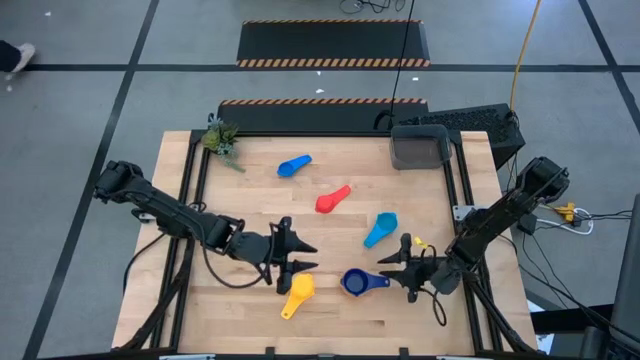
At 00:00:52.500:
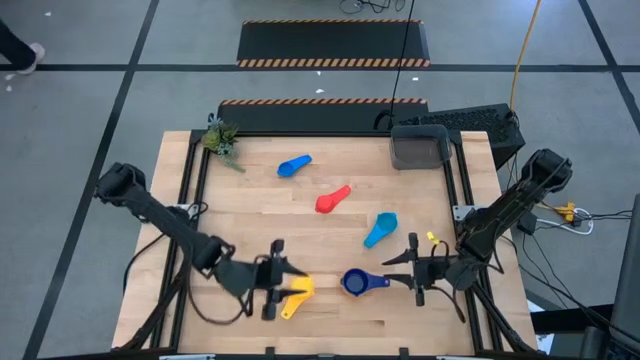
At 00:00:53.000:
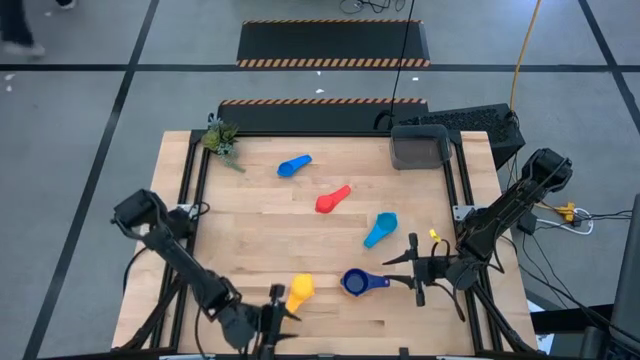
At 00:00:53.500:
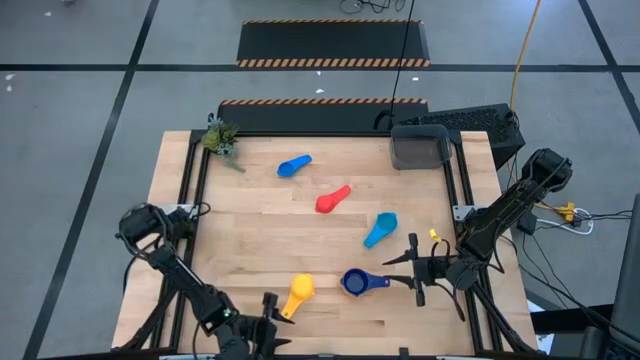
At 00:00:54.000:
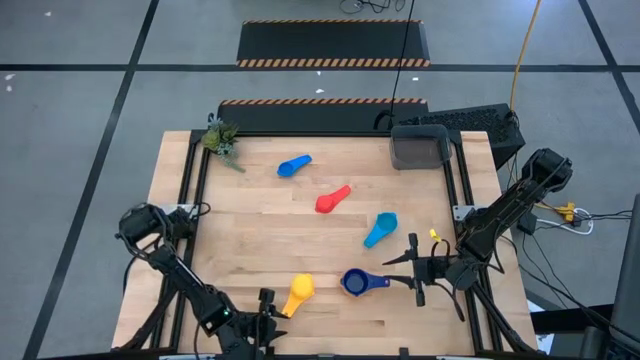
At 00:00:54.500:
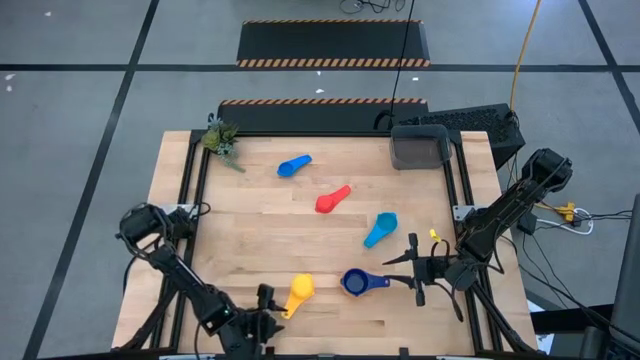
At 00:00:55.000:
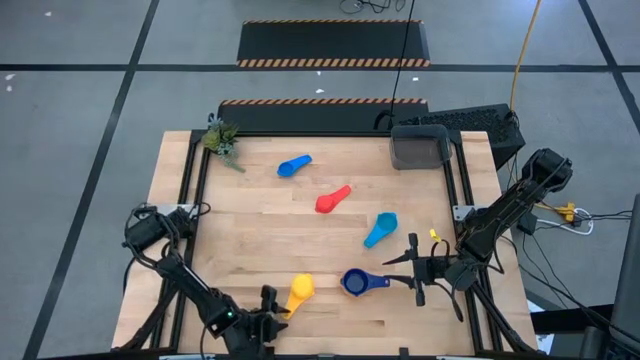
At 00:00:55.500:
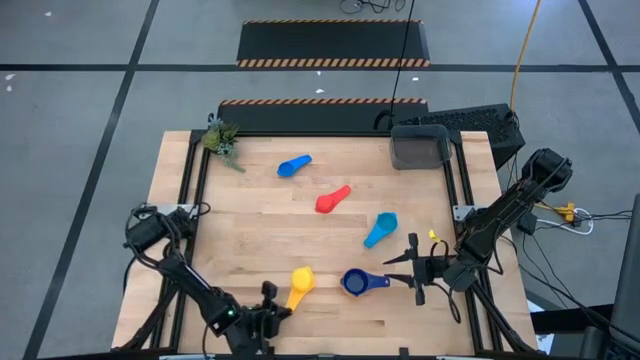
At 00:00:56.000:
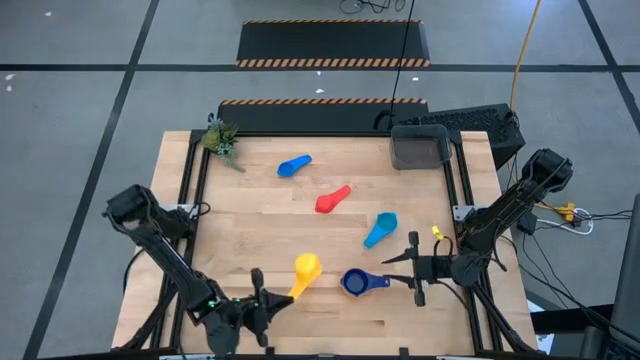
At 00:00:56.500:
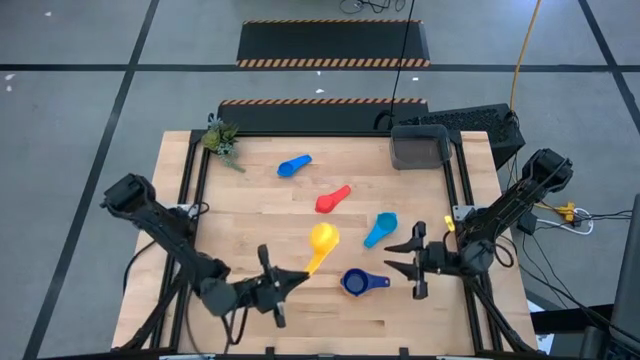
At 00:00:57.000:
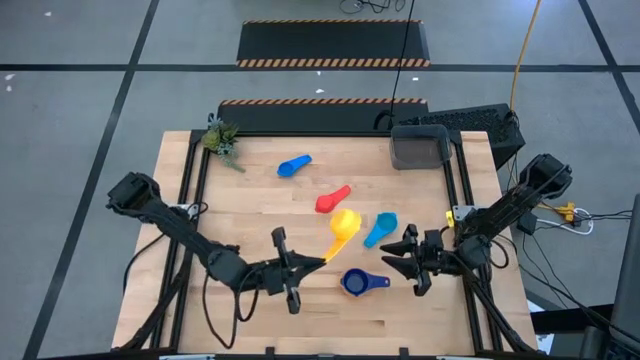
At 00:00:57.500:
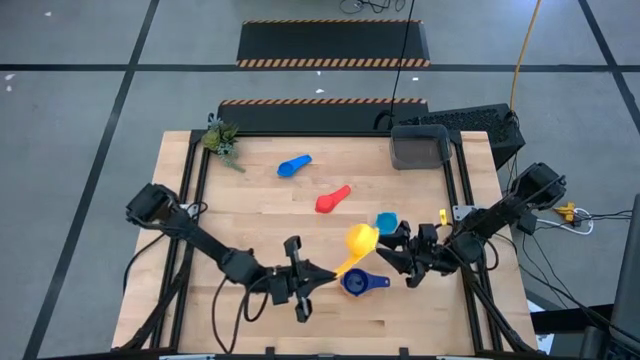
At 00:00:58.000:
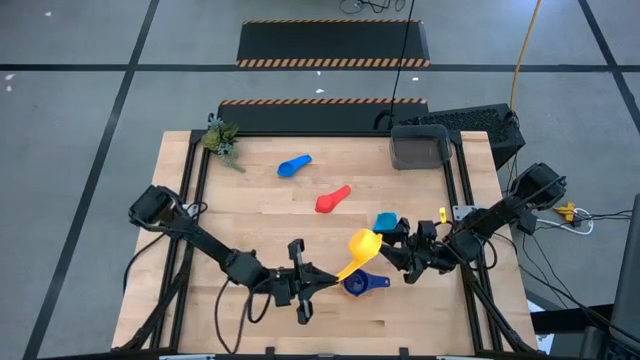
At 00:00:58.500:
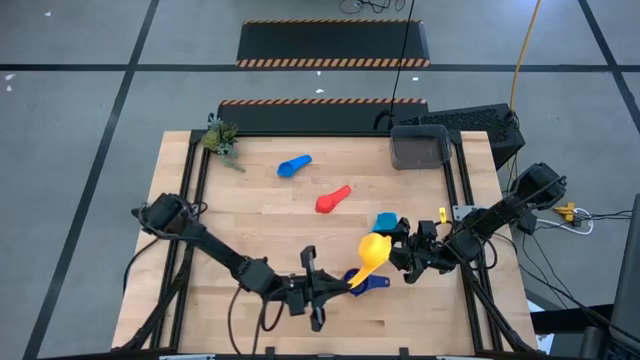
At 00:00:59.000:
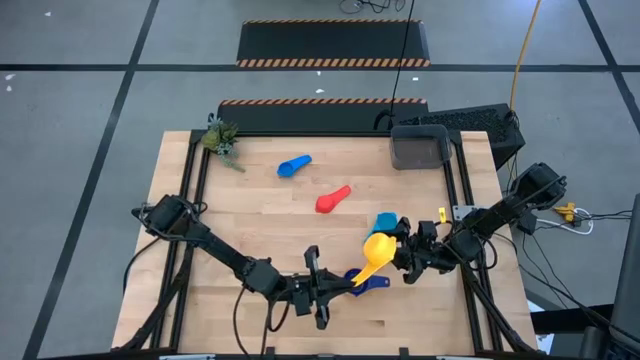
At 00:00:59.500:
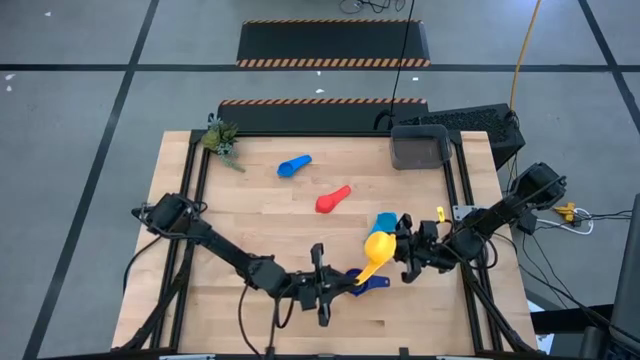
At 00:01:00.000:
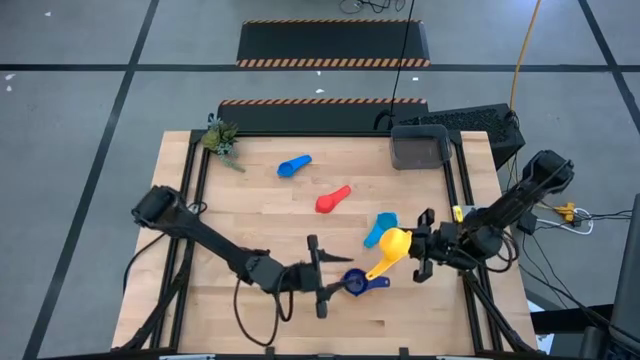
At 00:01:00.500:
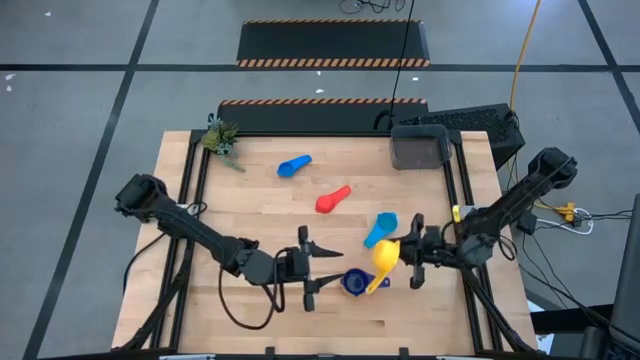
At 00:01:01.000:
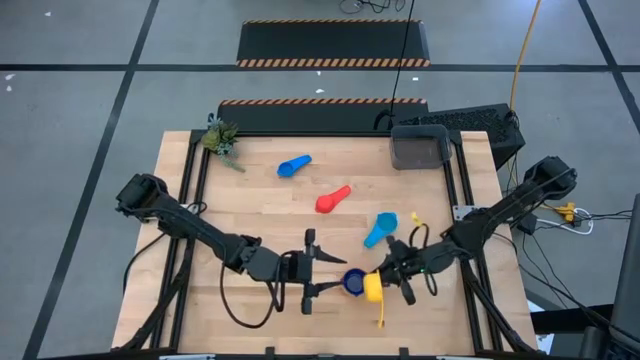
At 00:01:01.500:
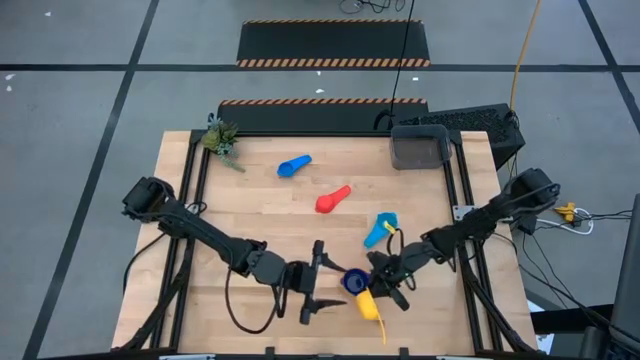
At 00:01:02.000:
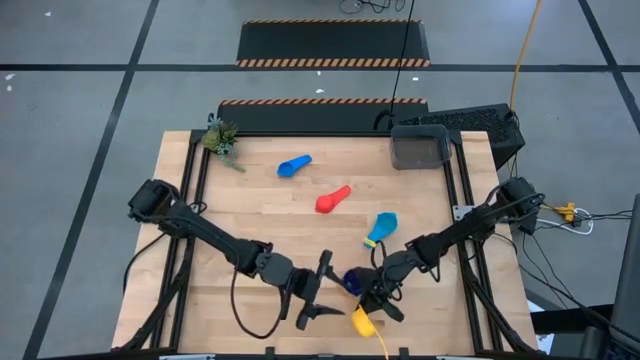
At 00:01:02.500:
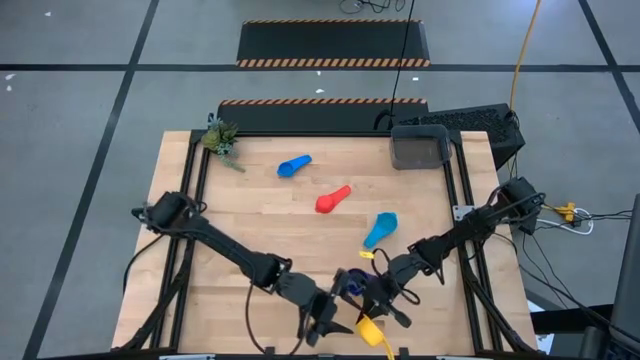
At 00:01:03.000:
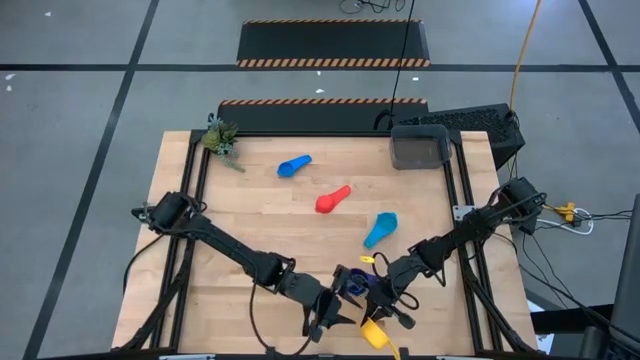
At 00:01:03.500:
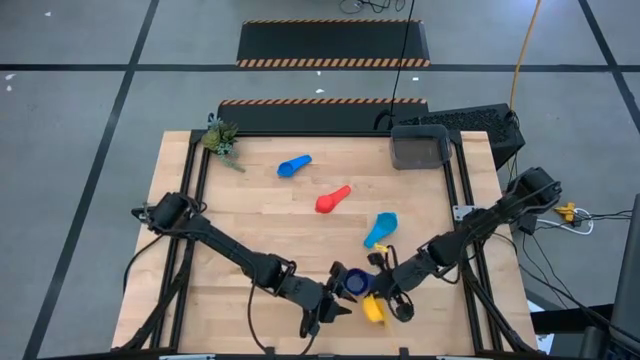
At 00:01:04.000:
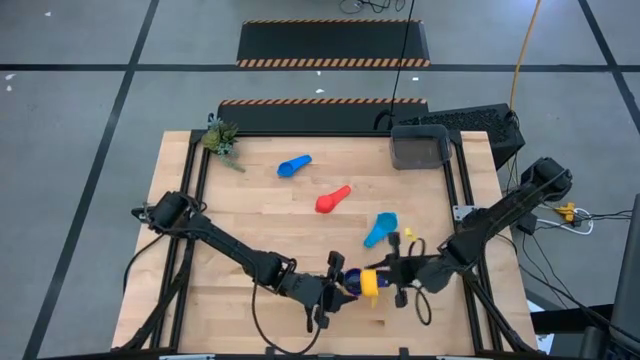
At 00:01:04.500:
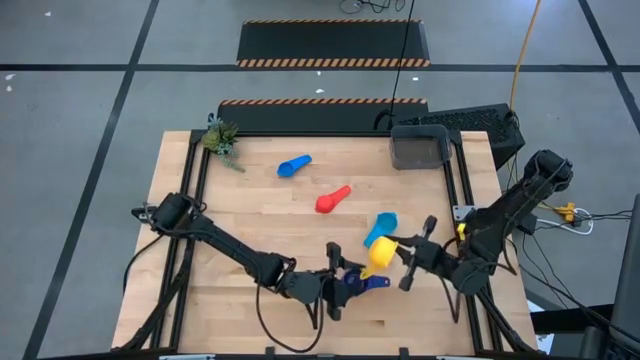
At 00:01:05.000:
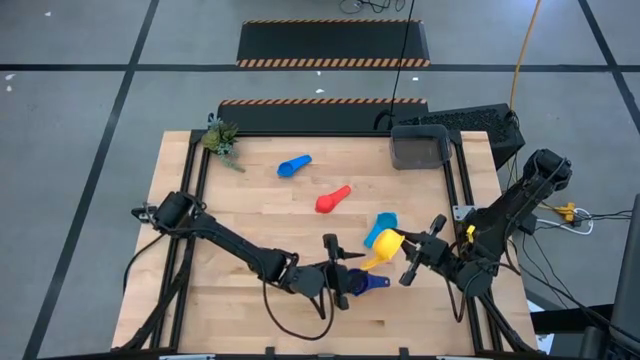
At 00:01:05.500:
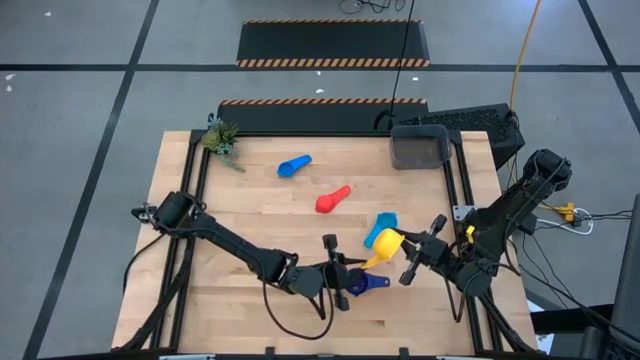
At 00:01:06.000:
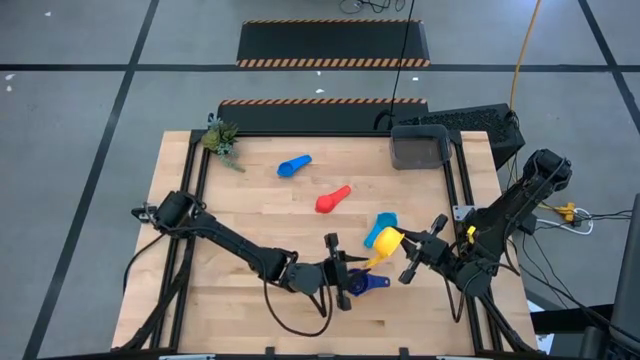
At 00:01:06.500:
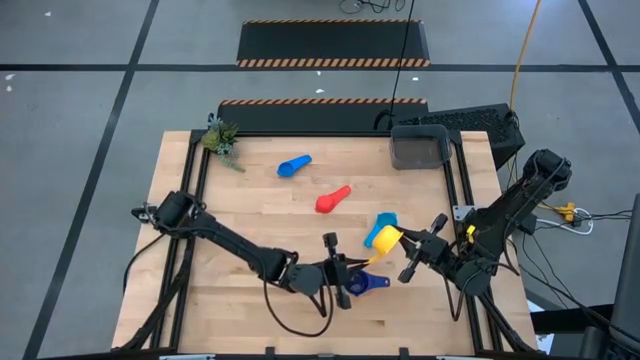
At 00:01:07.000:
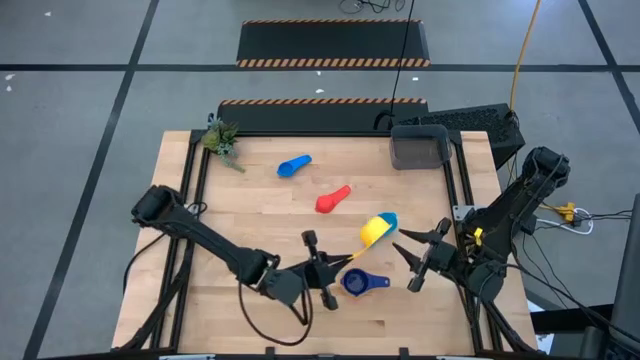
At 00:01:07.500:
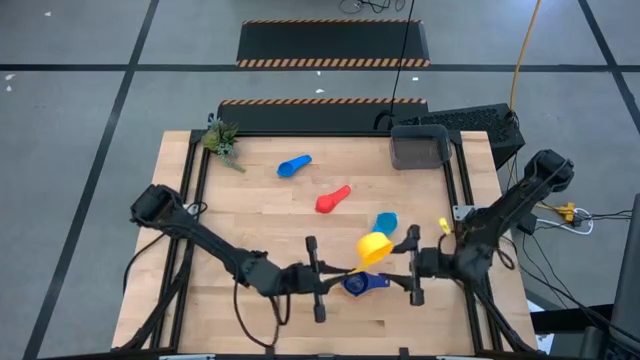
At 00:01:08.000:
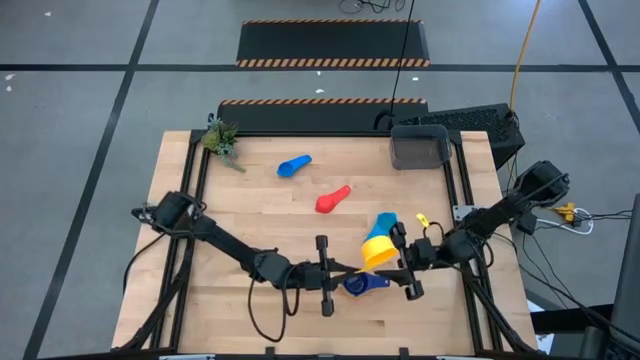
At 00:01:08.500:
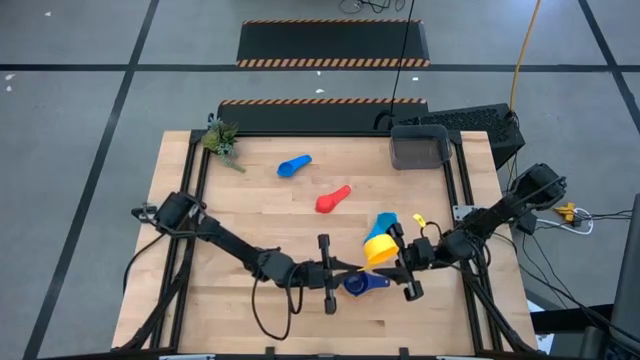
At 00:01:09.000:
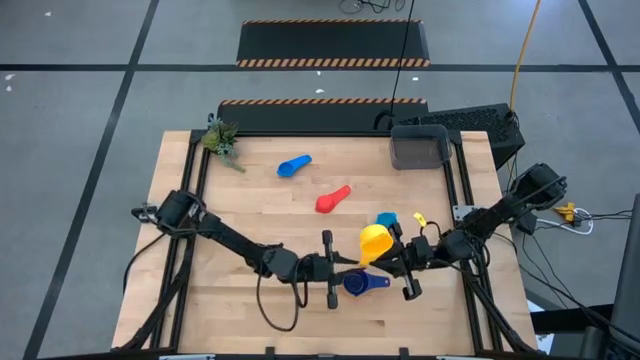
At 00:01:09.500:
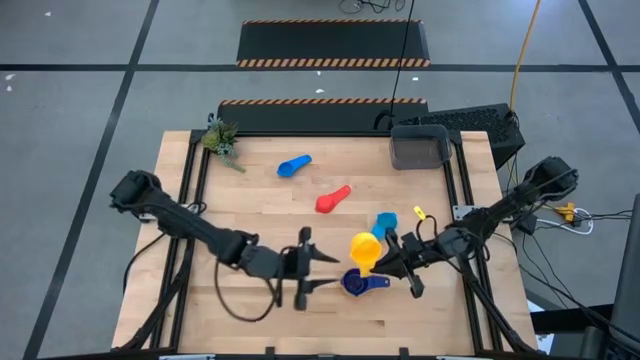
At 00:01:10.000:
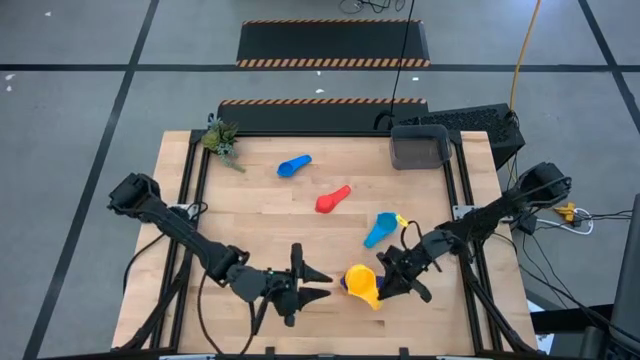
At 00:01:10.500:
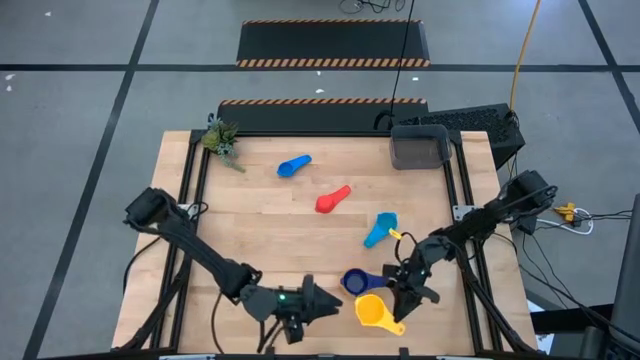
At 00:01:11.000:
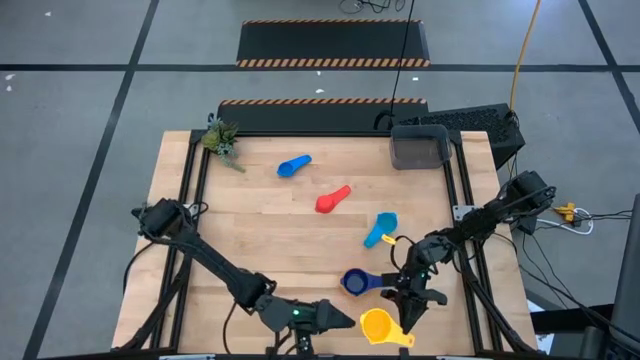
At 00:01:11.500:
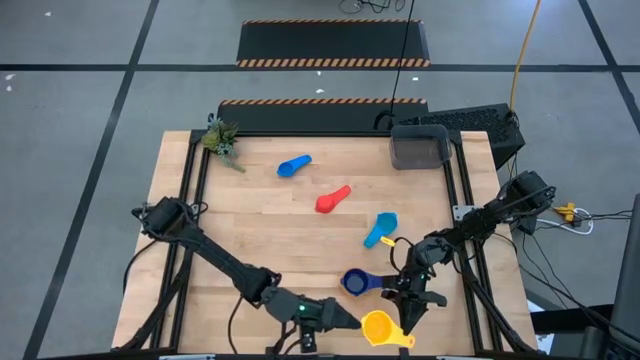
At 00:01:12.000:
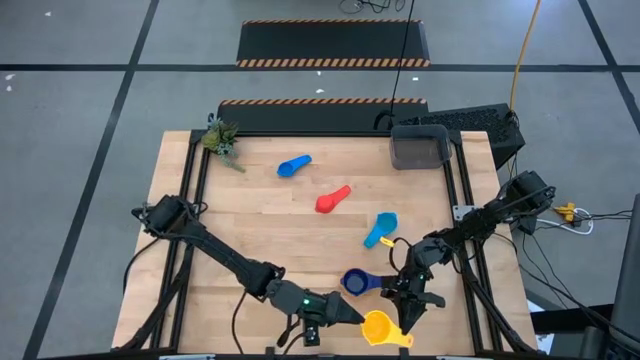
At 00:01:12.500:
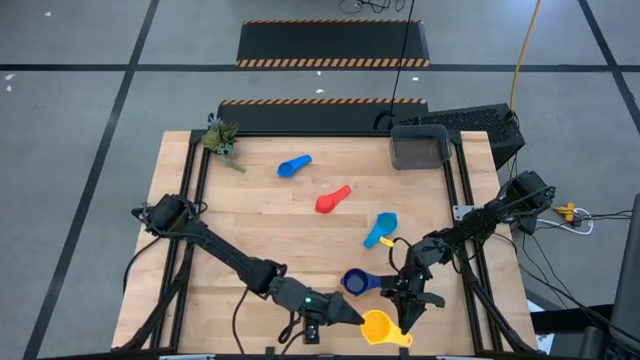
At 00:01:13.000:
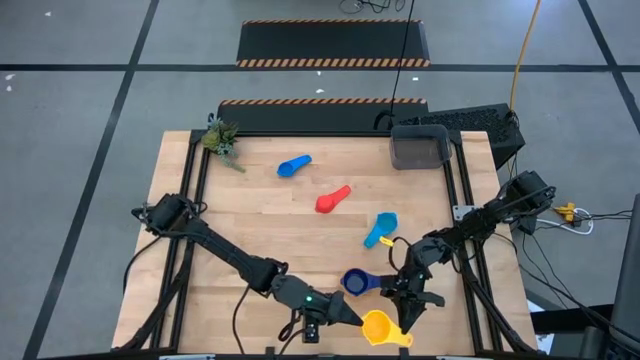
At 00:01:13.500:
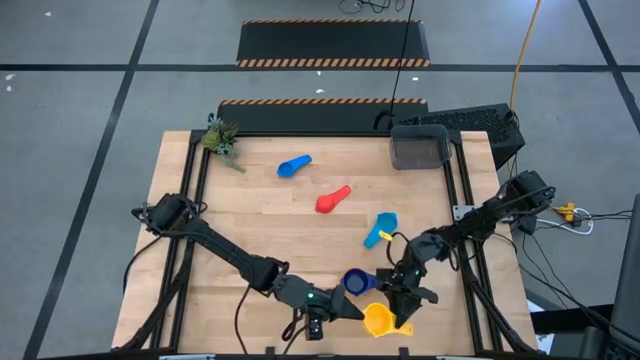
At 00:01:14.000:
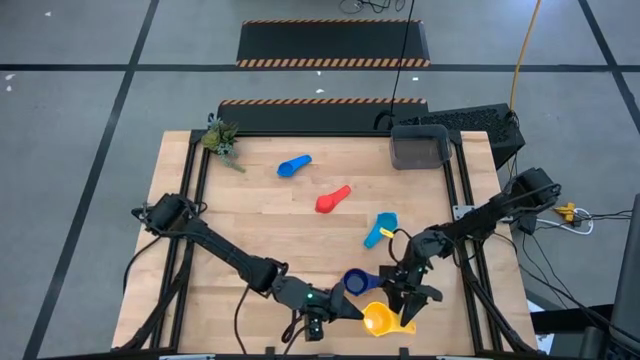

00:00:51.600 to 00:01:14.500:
Task: Nest measuring cups in basket
Stack the yellow measuring cup on top of the dark blue measuring cup
